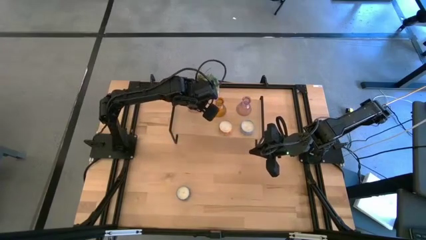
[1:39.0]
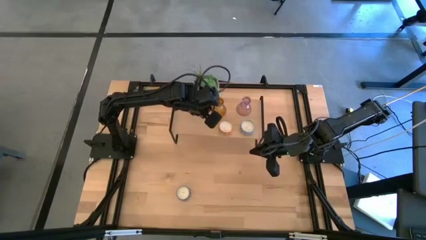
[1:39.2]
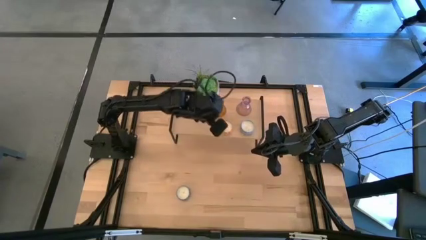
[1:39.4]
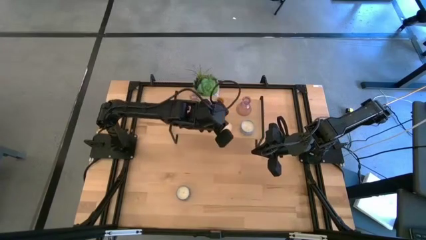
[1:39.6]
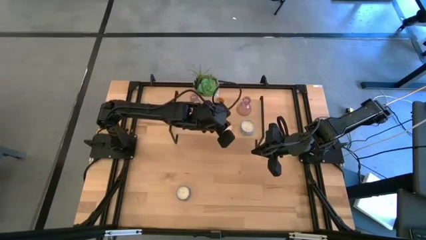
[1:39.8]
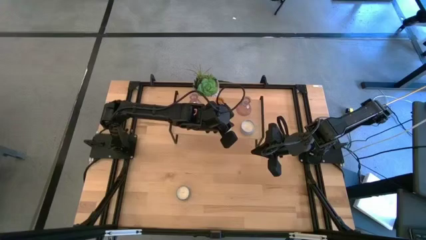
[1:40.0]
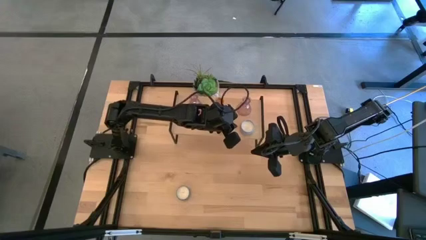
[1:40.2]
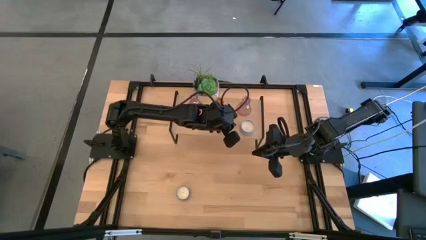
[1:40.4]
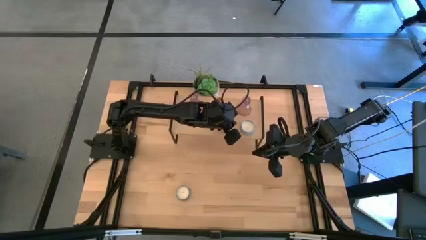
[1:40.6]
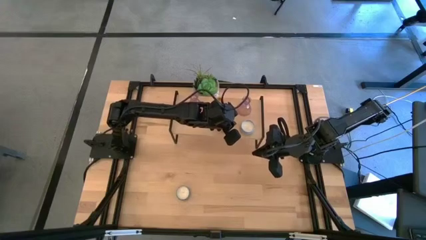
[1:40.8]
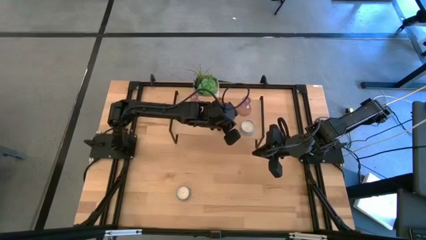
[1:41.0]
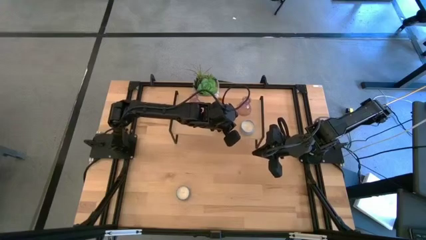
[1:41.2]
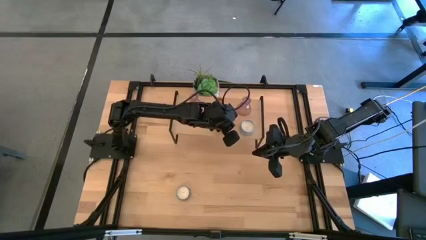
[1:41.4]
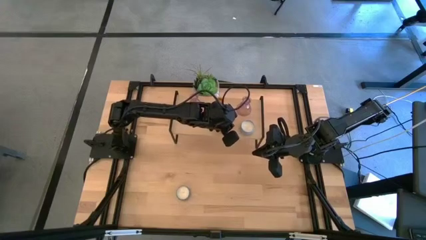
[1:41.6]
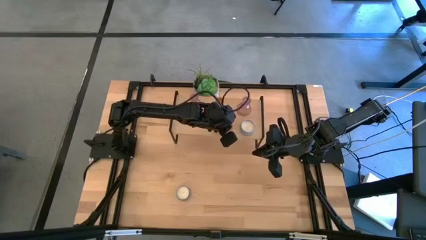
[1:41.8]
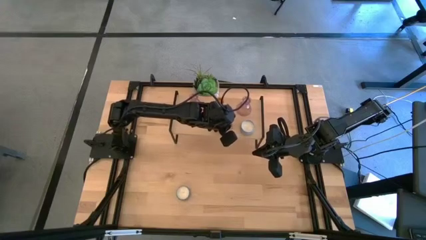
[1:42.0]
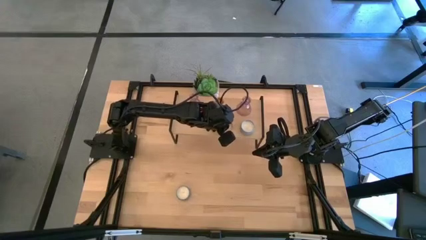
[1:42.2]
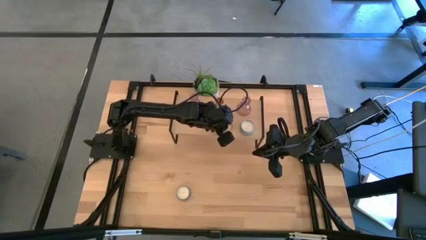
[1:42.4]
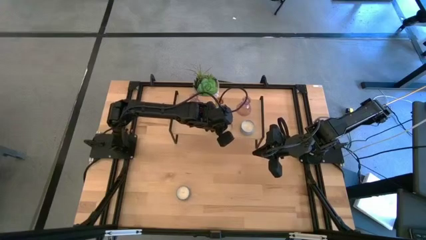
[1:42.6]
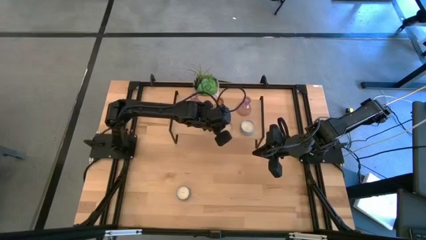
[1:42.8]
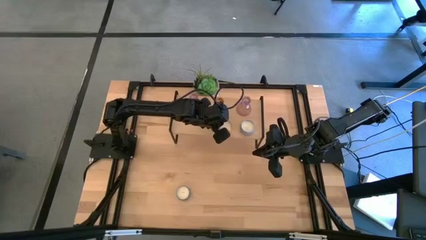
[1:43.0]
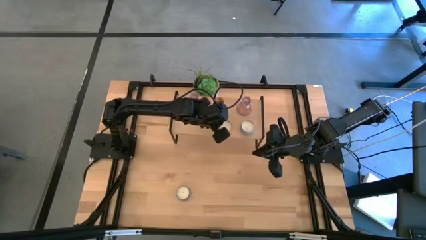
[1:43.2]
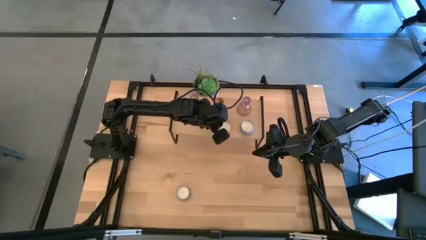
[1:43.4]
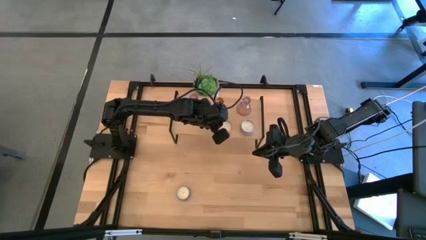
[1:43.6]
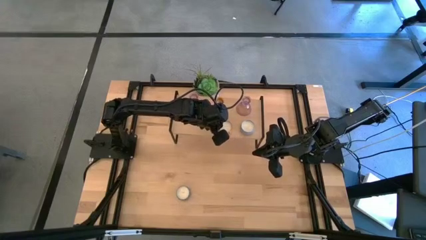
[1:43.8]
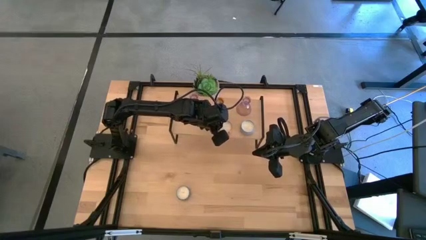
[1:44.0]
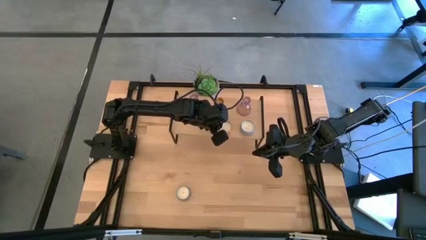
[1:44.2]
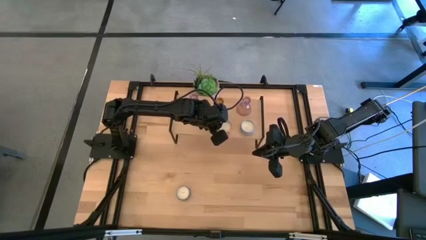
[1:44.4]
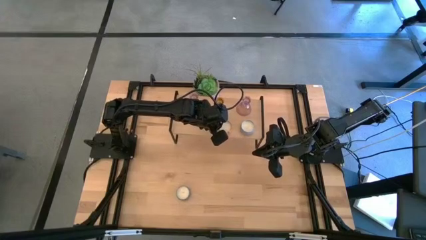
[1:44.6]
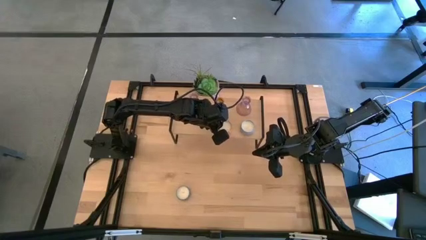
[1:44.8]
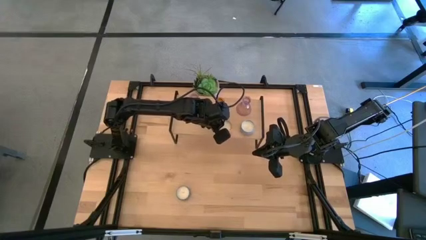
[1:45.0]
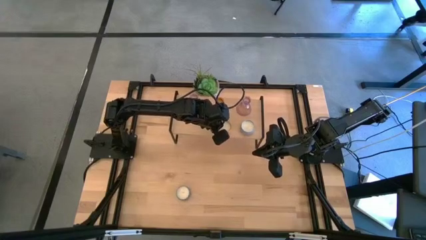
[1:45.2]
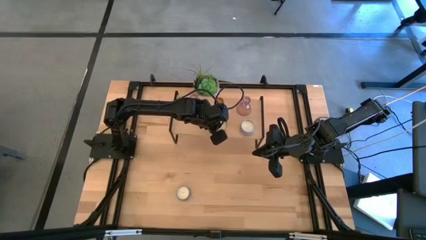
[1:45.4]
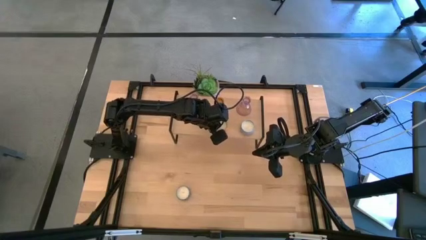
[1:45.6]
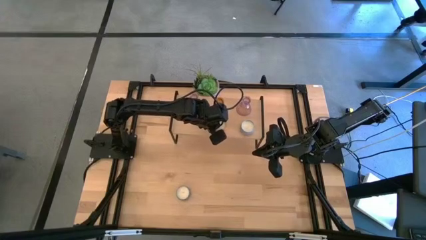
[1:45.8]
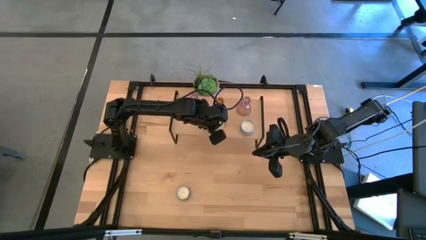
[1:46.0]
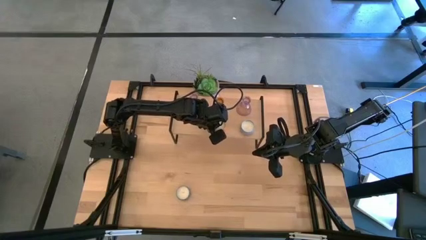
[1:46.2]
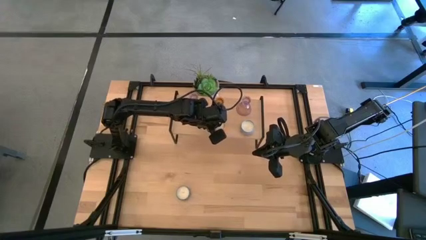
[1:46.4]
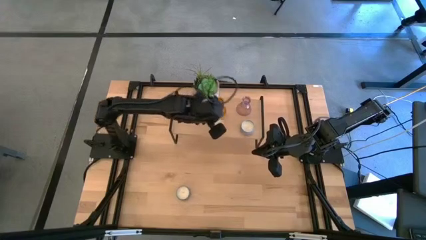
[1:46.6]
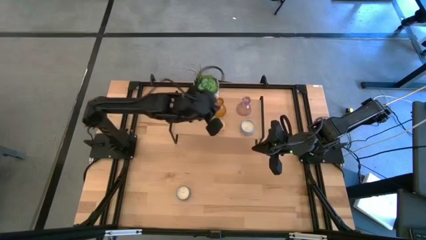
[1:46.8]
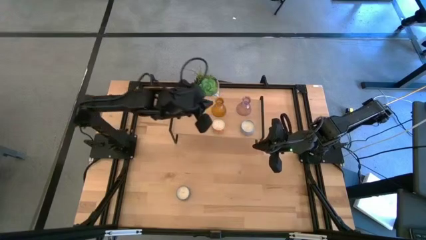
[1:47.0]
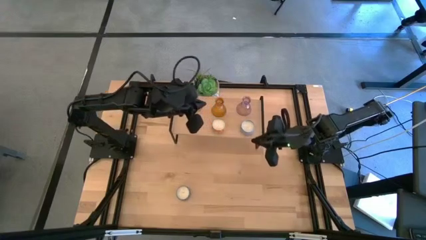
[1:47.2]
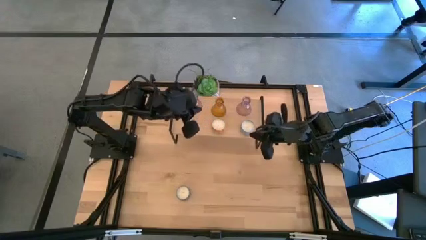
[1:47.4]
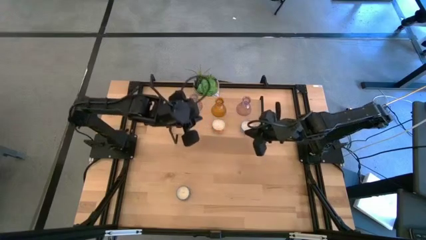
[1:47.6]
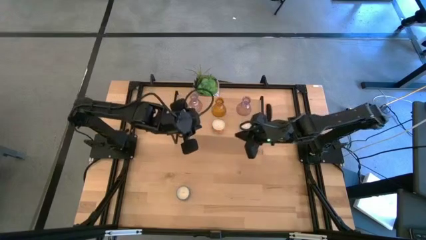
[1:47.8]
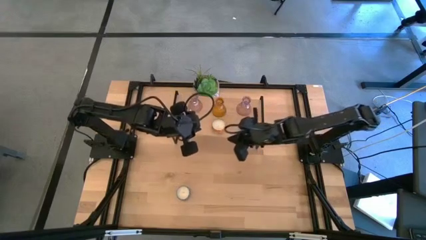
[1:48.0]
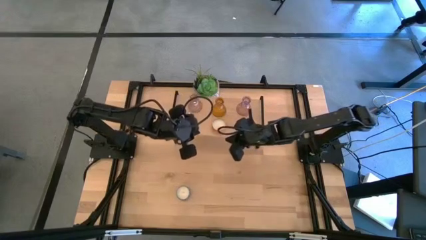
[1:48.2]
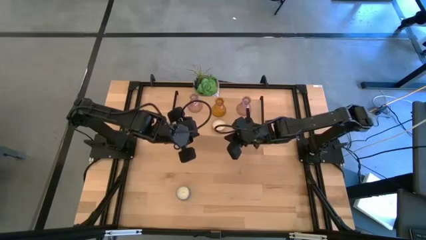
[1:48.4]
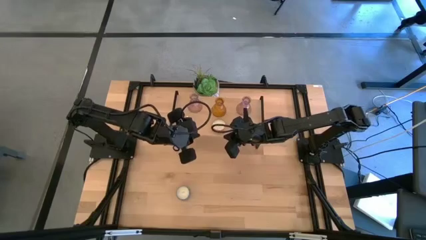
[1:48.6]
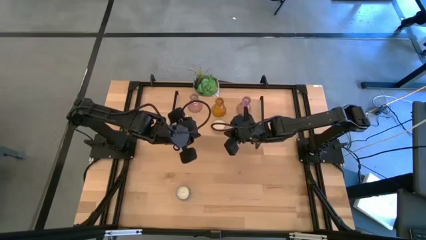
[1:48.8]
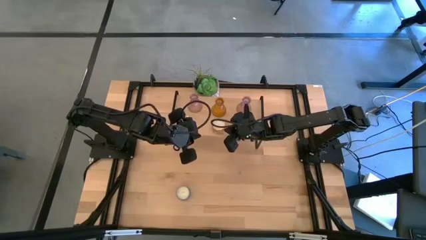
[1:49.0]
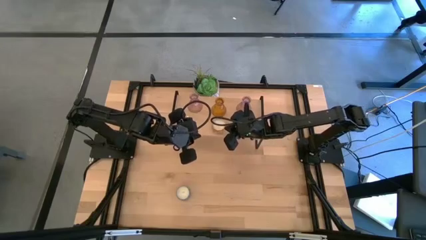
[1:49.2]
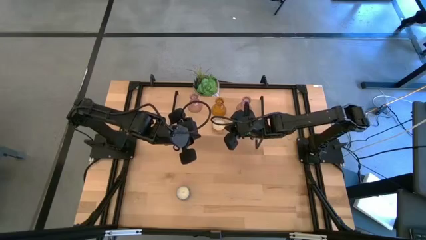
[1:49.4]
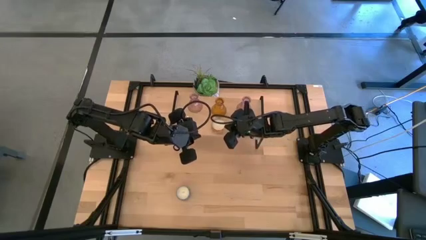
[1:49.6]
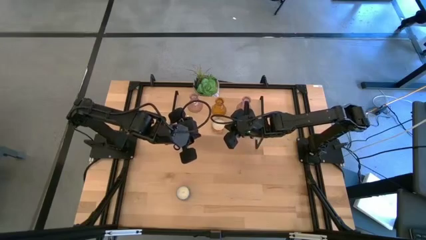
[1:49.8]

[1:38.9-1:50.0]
Task: Pick & Place candle stick holders
Adjust the orange candle on the shelf

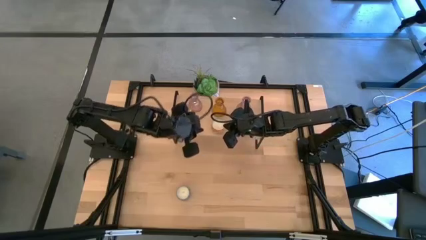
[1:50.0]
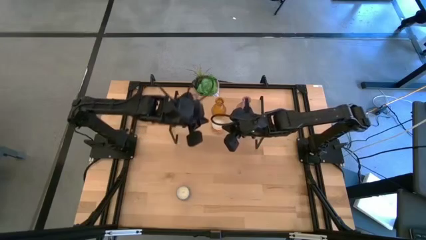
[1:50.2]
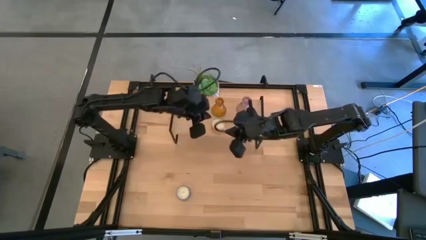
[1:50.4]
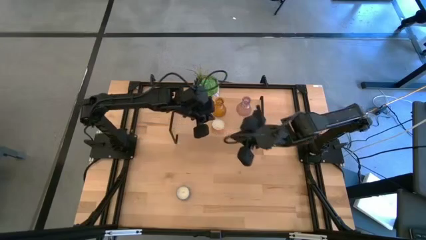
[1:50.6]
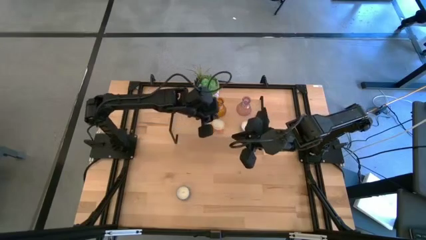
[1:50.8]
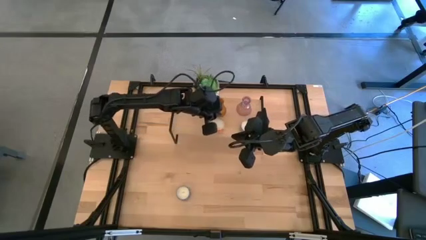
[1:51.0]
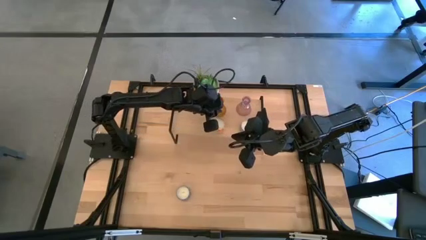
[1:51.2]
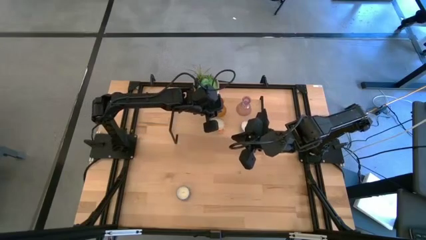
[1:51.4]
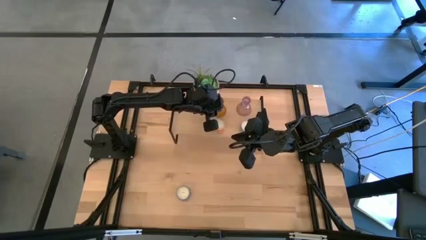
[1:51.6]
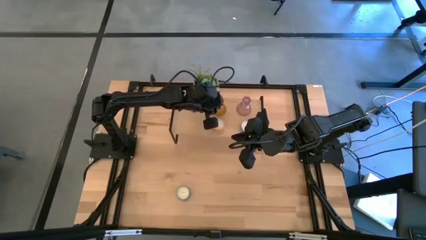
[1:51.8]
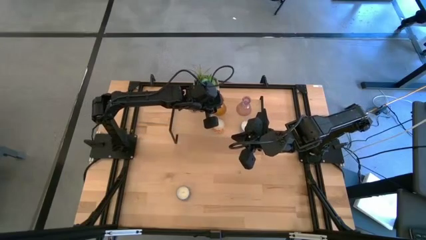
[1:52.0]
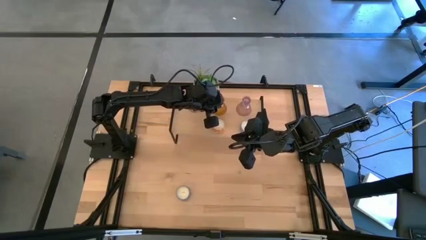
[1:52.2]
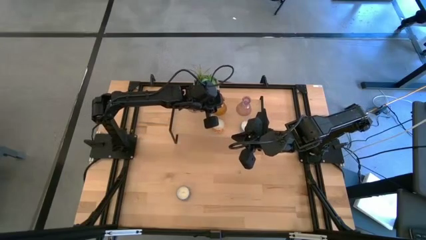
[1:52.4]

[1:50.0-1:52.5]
Adjust the orange candle holder on the shelf

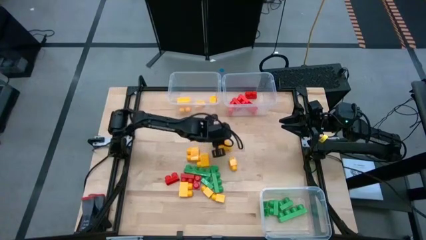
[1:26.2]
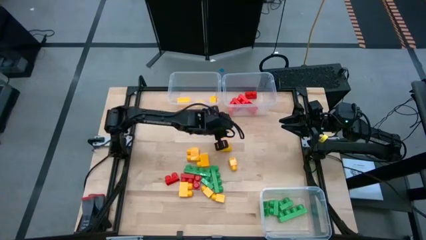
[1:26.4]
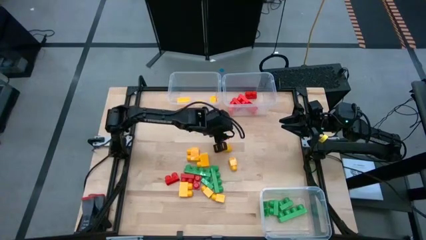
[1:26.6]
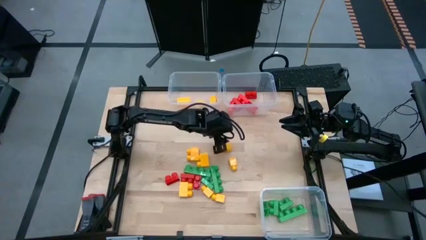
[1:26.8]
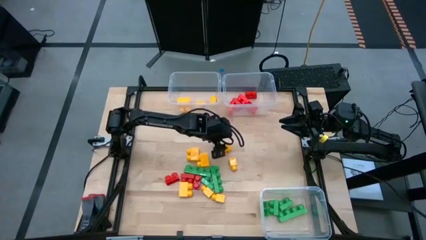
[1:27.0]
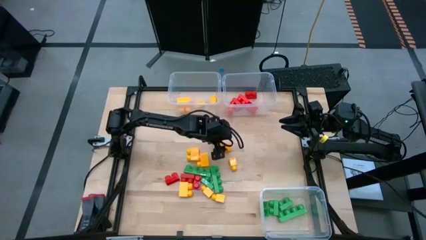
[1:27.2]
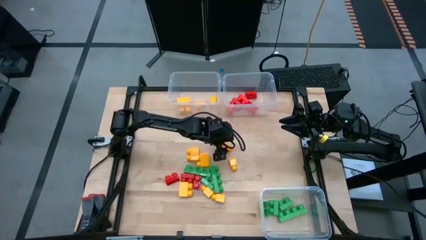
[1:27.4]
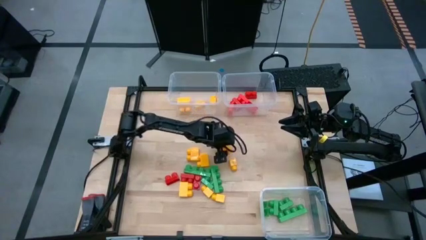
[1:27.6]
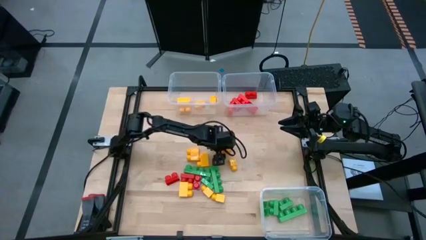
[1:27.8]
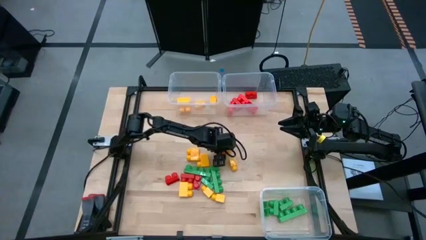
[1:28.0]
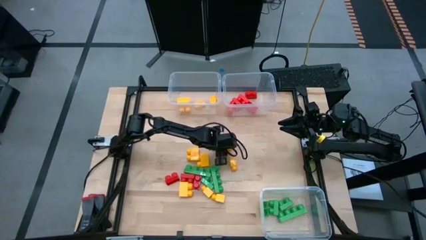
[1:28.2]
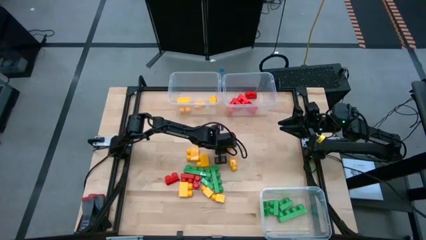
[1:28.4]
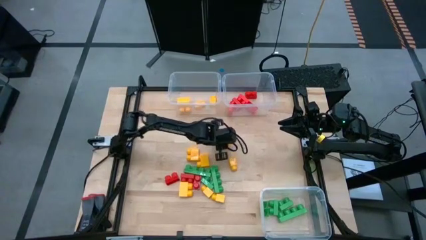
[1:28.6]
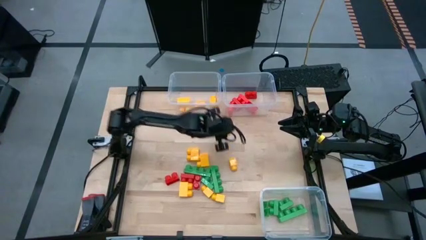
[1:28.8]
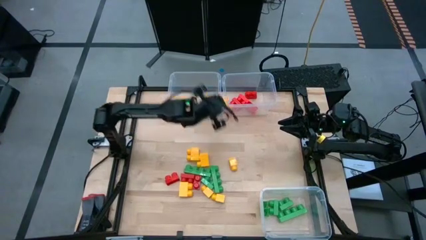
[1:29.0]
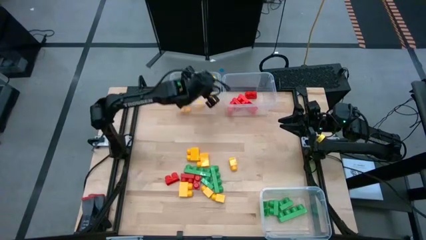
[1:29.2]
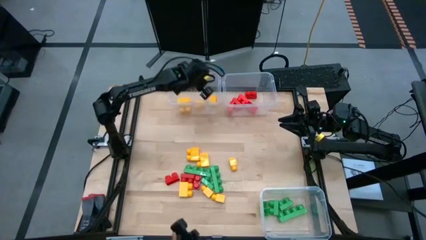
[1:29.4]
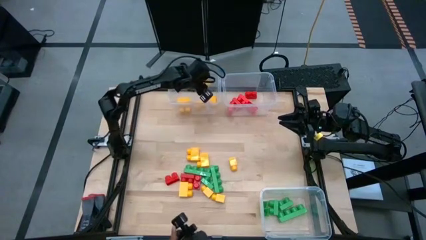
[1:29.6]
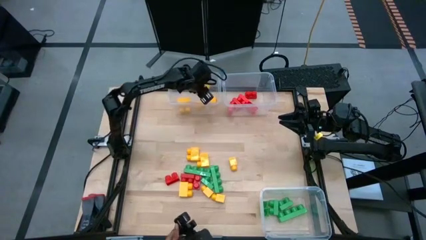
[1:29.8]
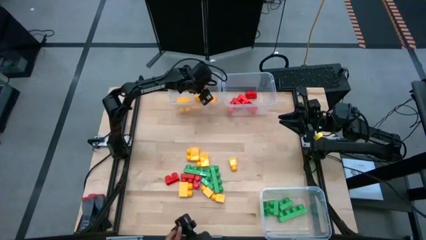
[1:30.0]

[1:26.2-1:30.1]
Task: Sort blocks
Put the yellow game piece into the top left transparent bin
